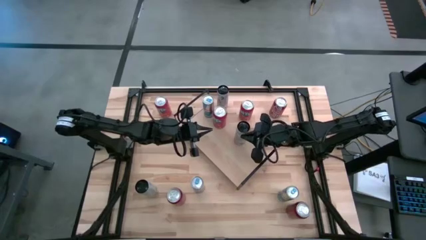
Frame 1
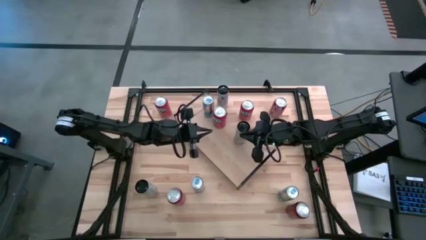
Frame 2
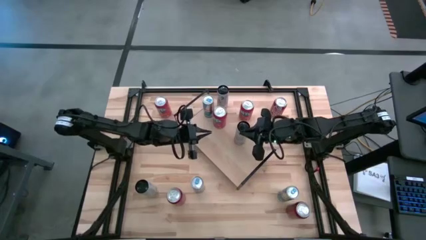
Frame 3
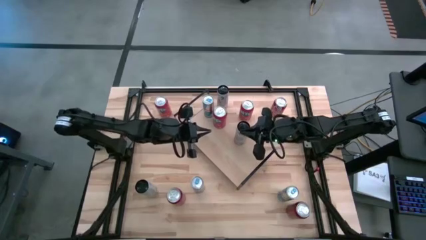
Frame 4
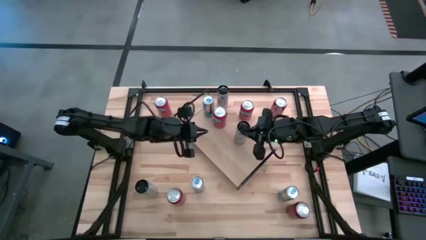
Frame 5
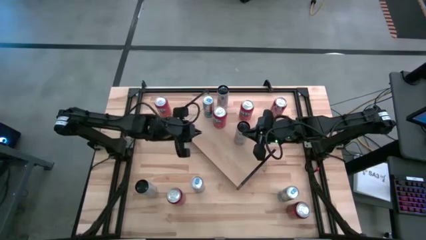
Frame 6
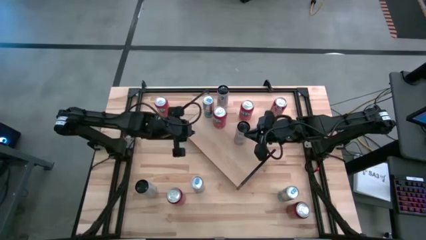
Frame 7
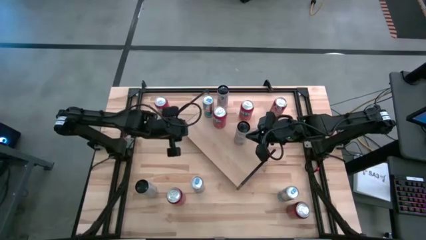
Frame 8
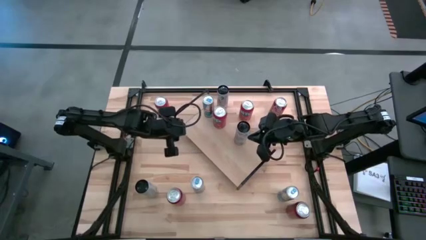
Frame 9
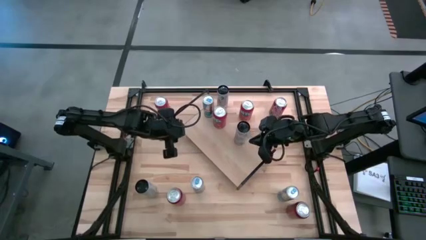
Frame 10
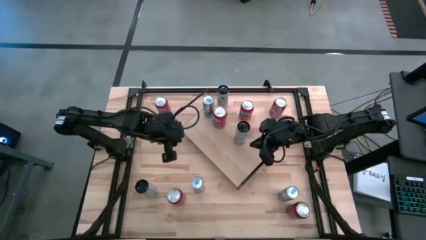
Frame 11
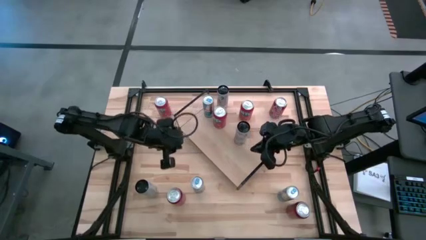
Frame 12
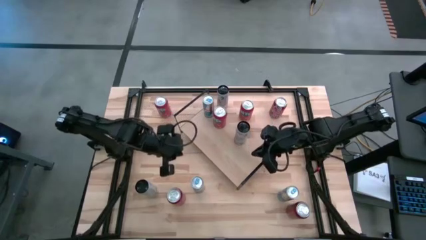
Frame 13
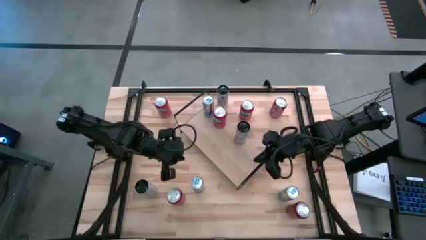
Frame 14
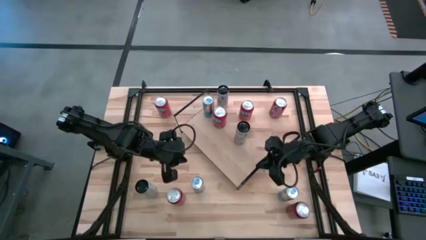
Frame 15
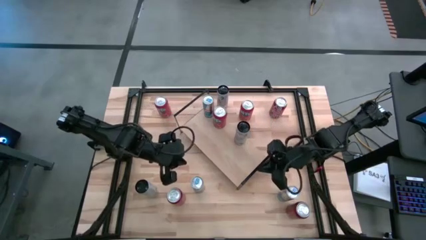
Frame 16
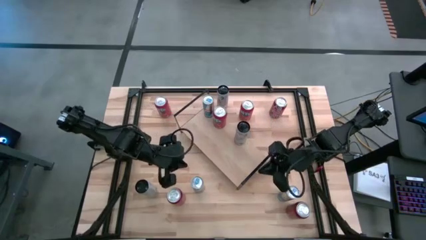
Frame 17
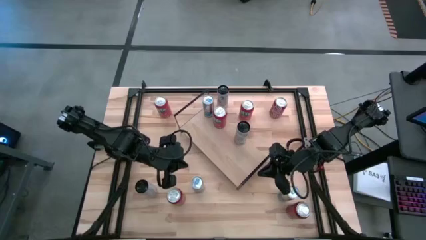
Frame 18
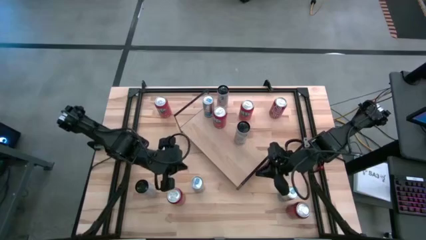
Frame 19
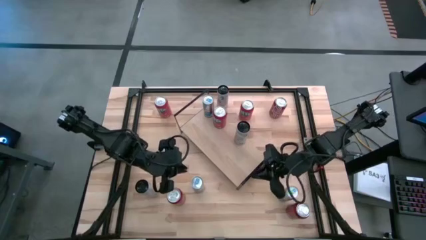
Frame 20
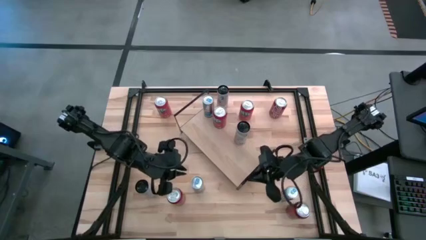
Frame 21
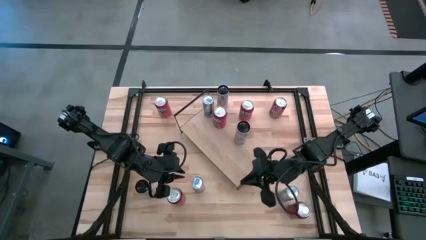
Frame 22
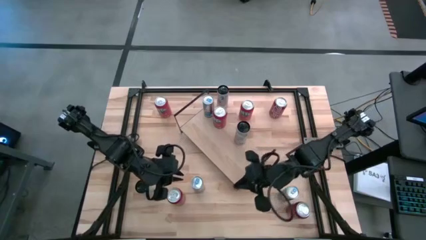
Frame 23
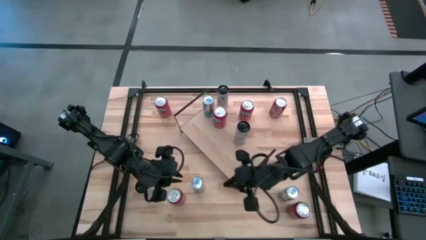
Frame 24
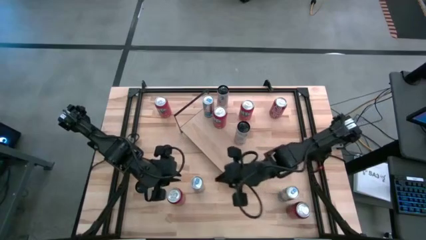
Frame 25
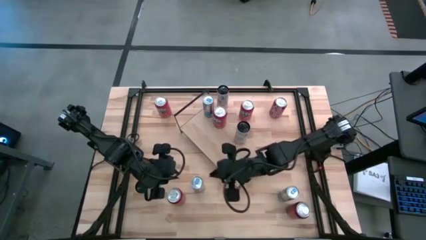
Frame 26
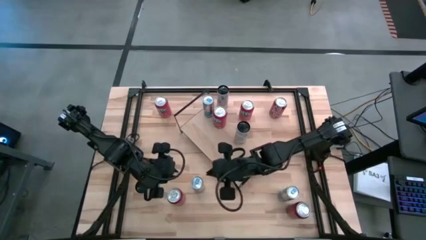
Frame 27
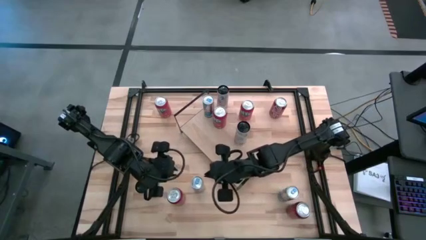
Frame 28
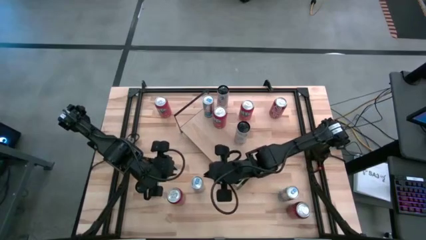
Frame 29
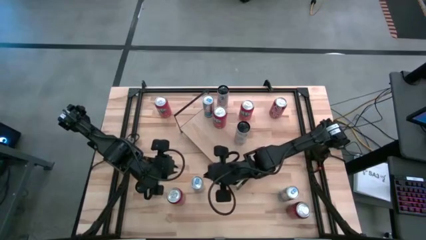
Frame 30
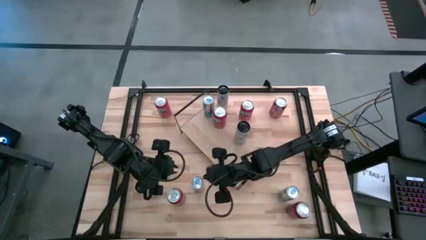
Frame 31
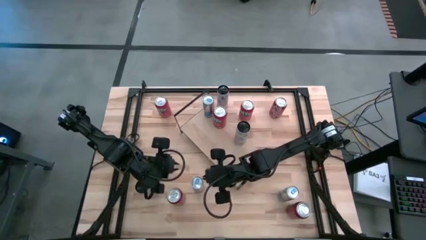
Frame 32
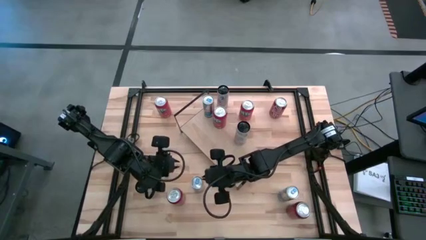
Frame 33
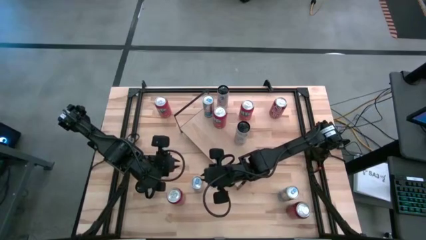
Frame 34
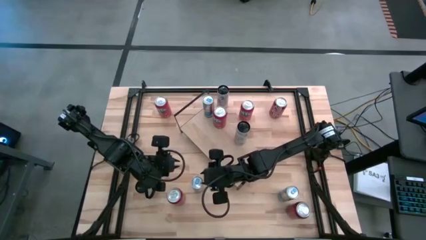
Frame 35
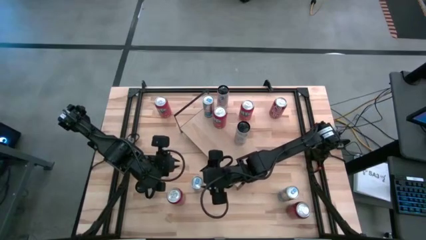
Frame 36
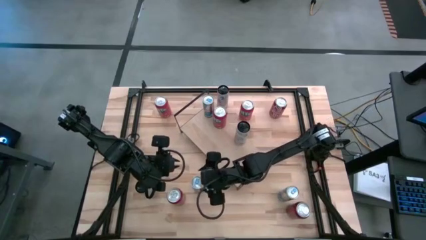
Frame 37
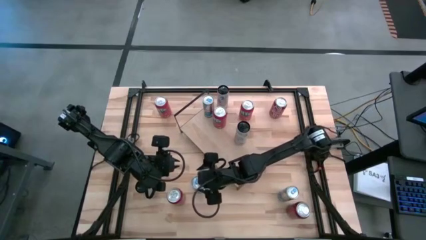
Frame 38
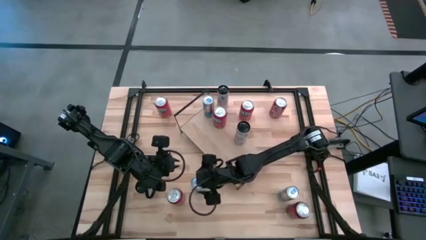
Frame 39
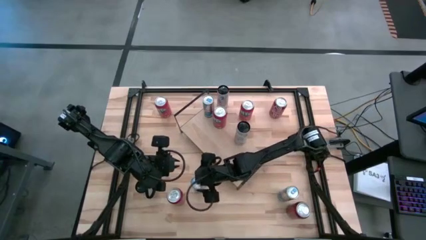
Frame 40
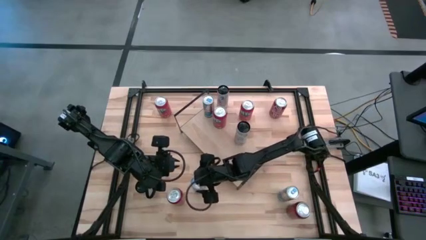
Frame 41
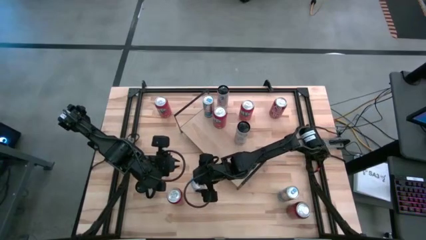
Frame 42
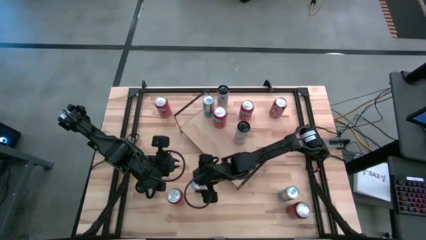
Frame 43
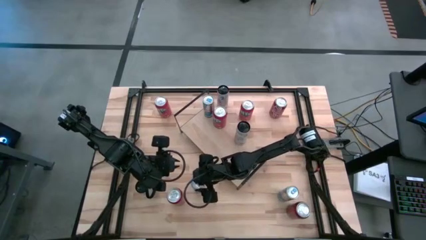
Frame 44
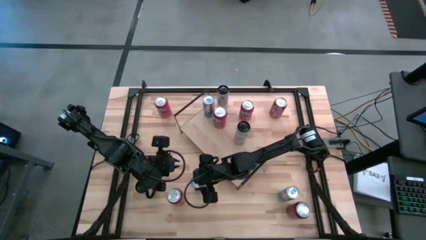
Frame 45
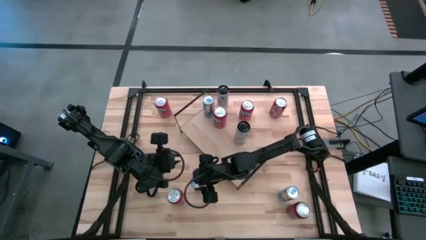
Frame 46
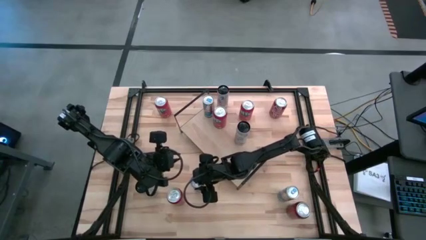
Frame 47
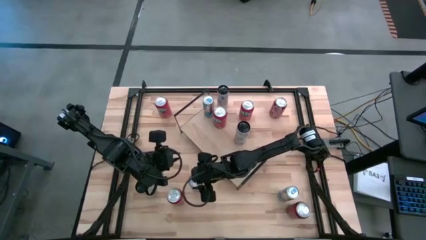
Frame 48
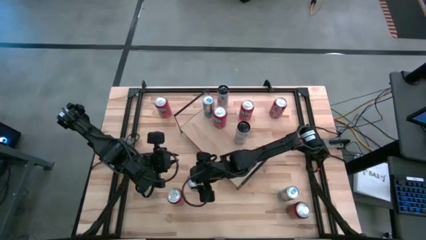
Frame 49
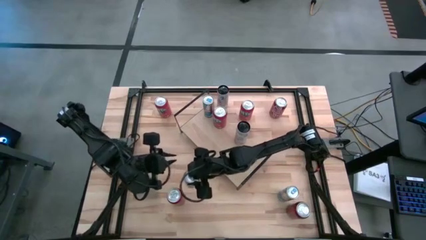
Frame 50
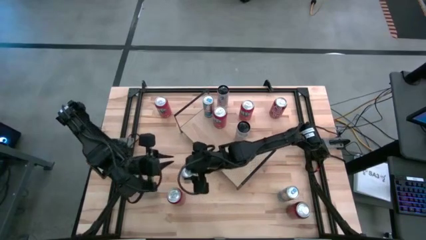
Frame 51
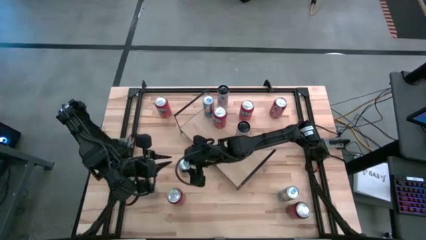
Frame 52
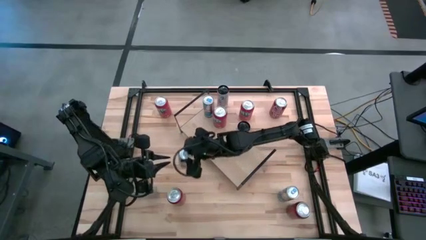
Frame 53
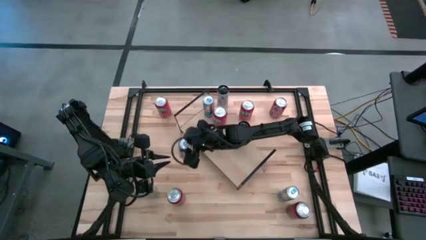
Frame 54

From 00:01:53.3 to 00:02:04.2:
Task: Place canned beverage on shelf
Put the left blue soda can on the shelf aligned with the blue can on the shelf

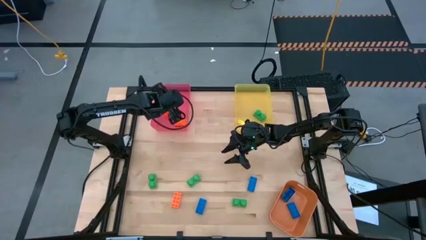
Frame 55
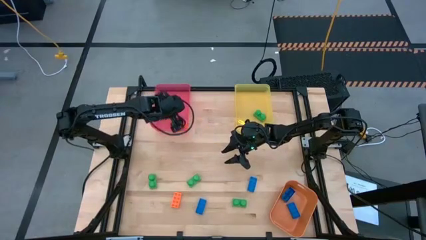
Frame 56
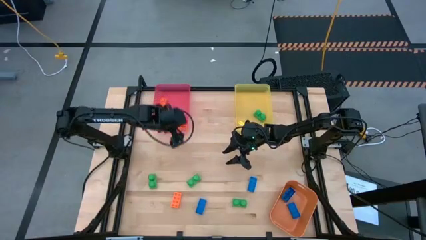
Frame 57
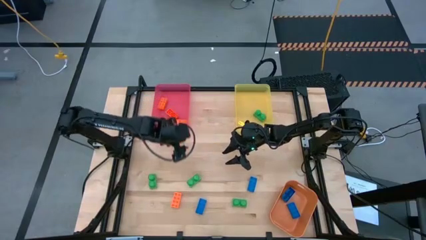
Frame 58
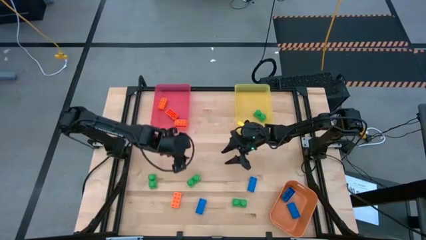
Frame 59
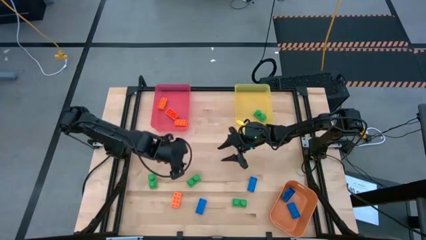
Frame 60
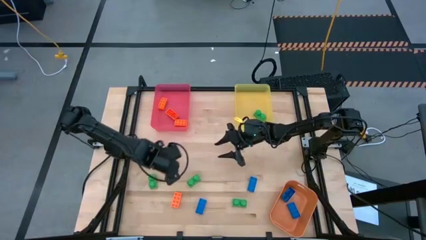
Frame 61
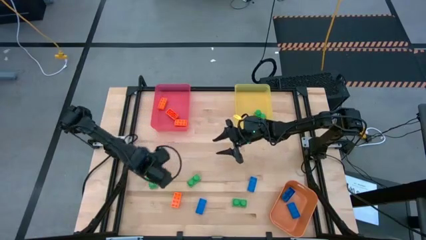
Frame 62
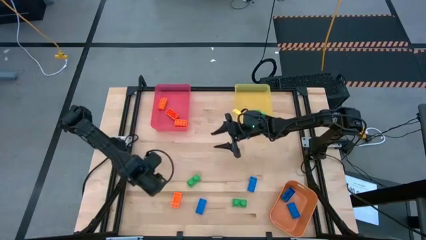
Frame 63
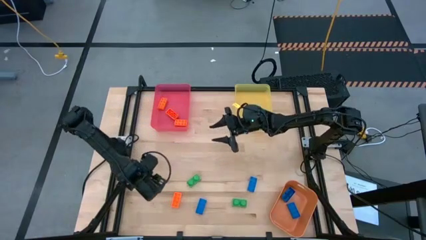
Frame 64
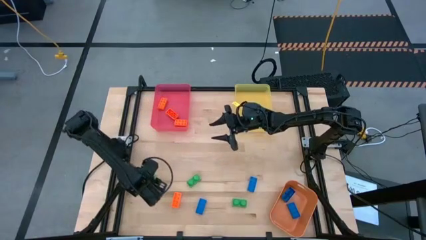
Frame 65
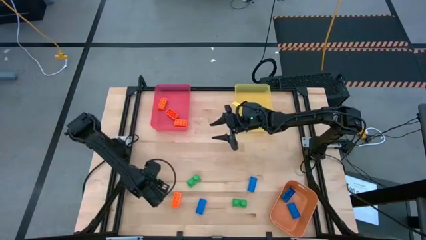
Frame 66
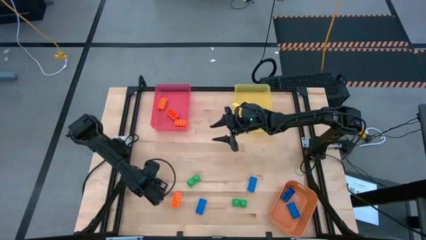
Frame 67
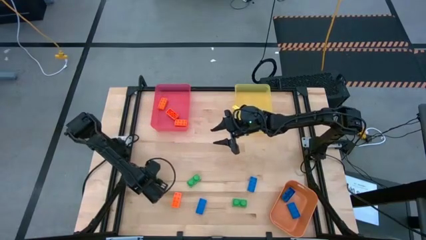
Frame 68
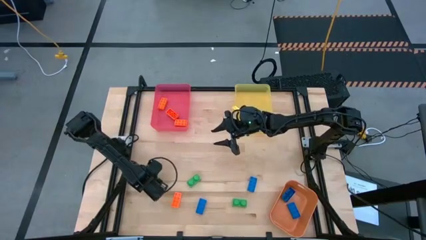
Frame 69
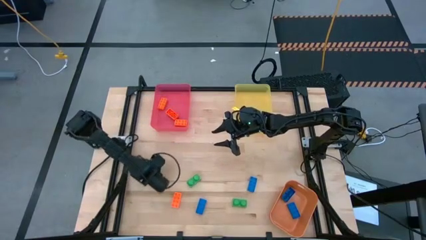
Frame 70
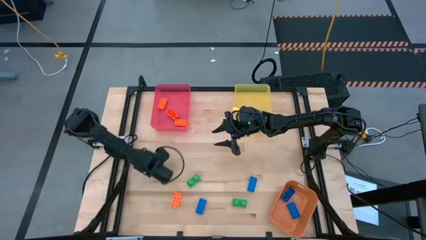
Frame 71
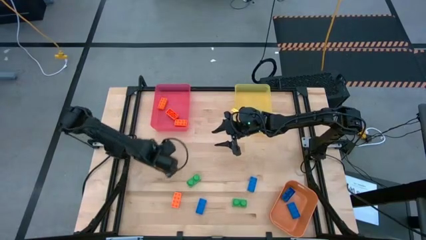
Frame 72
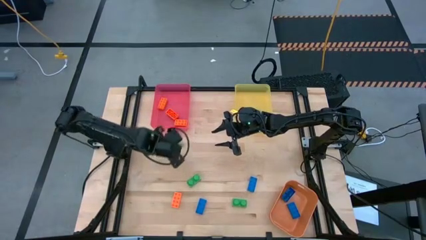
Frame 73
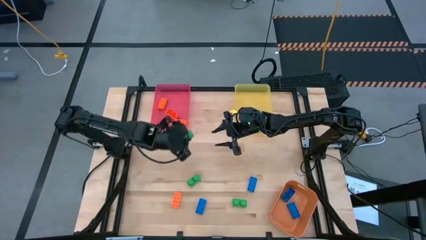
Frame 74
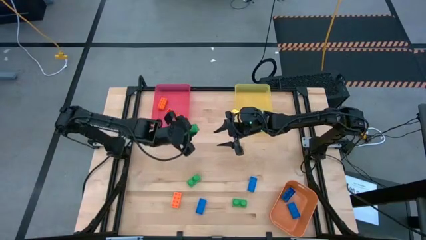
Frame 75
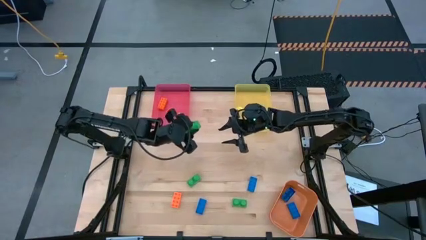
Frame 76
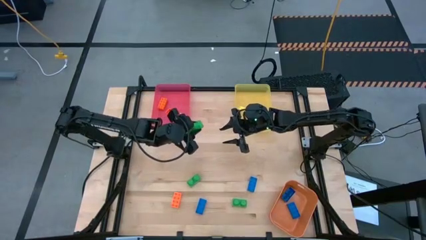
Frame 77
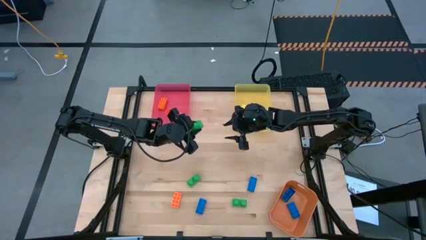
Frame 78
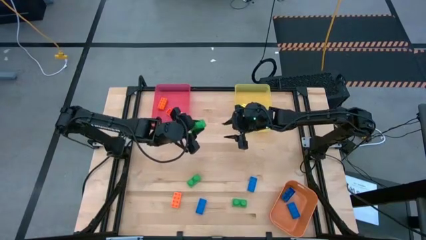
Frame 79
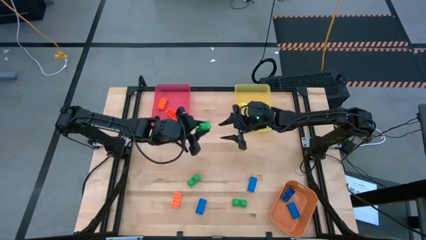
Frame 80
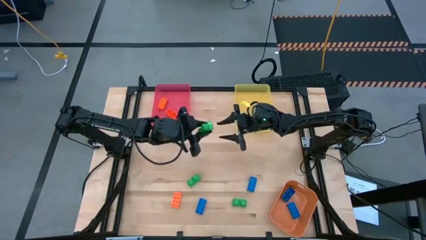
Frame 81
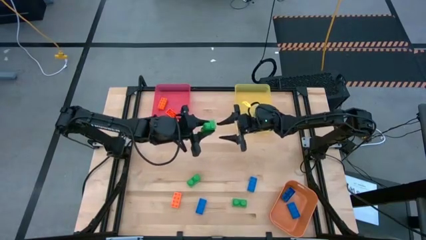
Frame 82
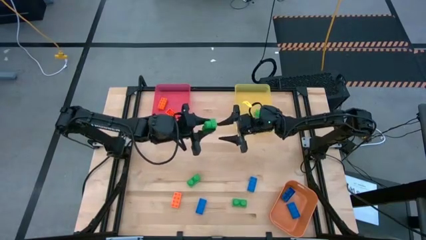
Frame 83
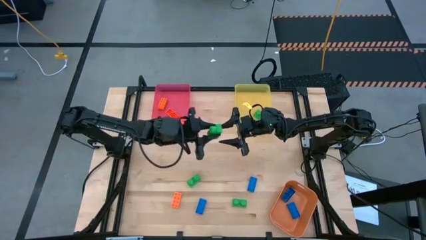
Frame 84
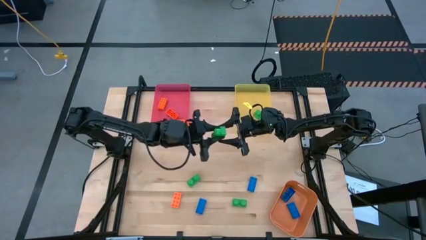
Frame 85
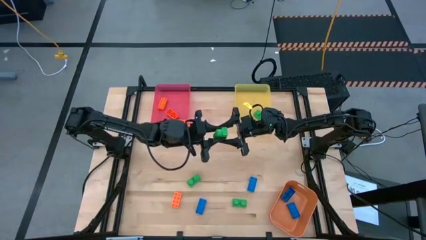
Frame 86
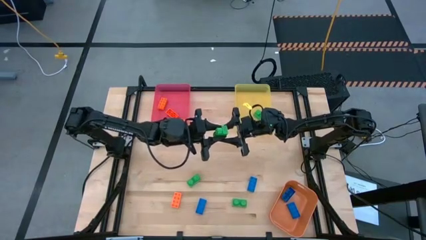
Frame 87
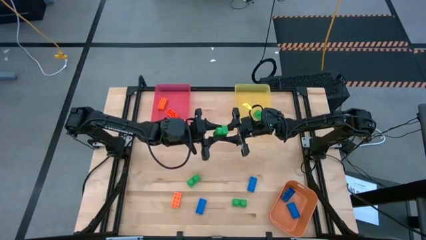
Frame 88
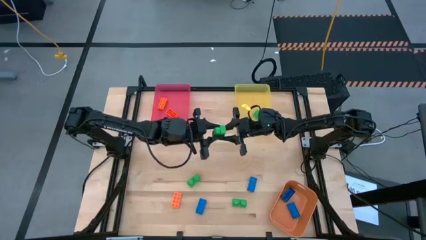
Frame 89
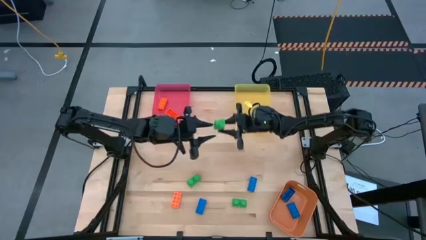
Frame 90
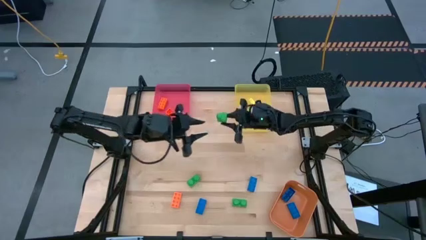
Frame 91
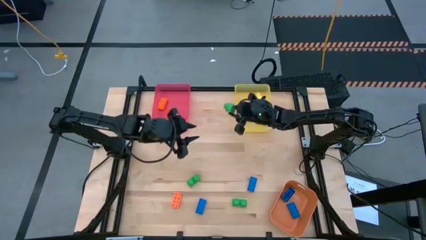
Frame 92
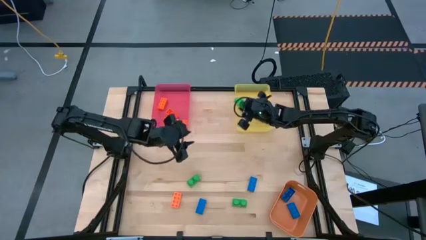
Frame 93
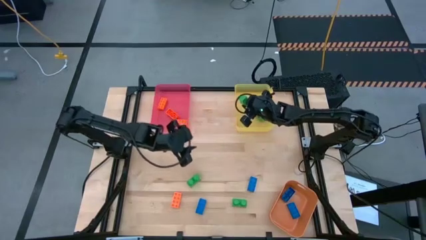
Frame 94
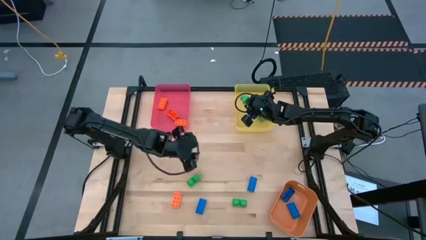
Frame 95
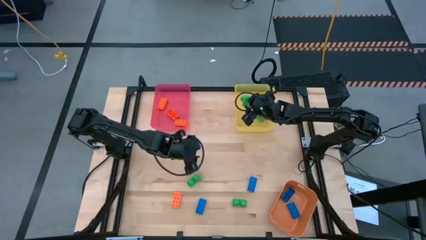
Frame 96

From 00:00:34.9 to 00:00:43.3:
Task: Sort & place blocks by color
Put the left green game piece into the yellow bin
